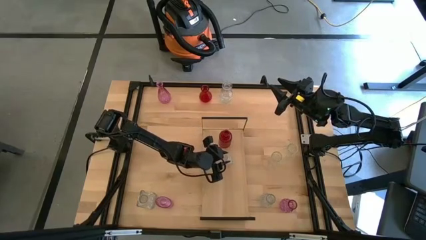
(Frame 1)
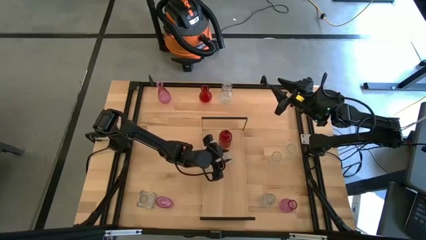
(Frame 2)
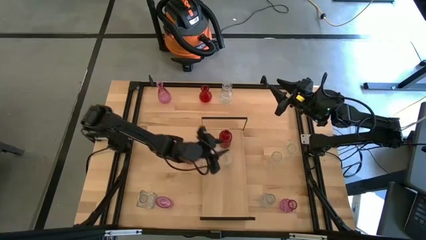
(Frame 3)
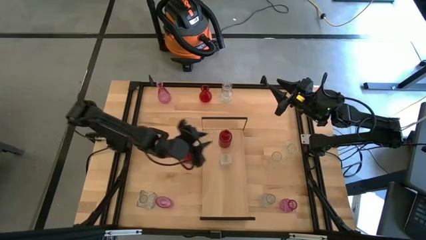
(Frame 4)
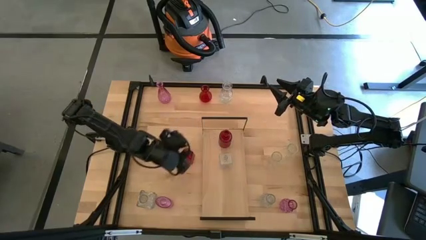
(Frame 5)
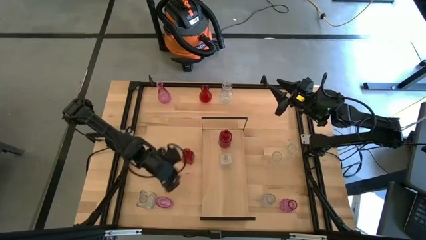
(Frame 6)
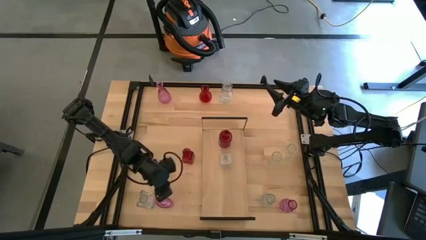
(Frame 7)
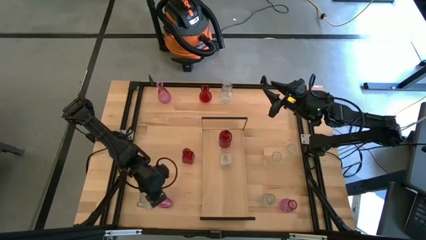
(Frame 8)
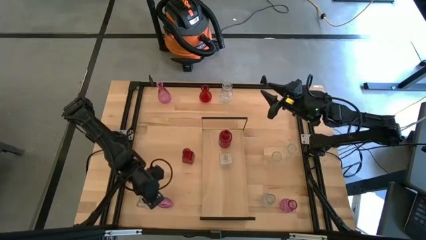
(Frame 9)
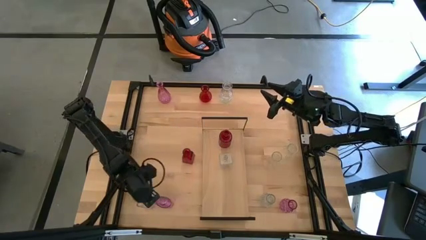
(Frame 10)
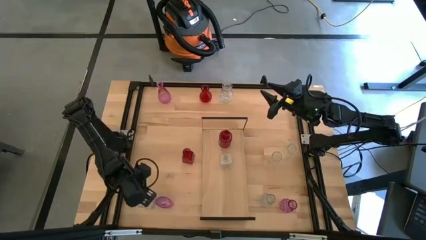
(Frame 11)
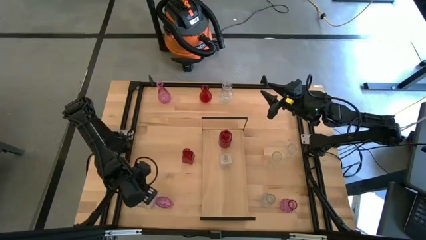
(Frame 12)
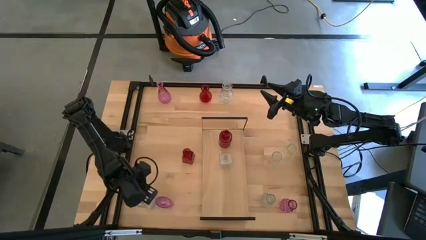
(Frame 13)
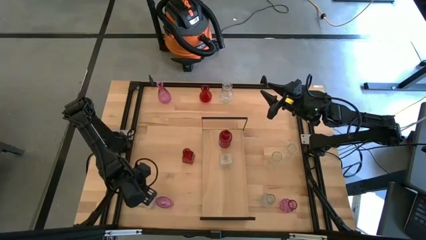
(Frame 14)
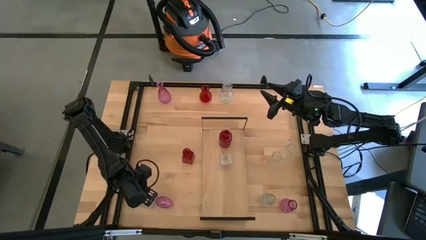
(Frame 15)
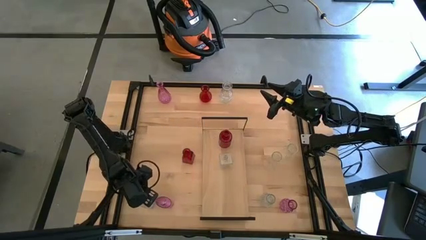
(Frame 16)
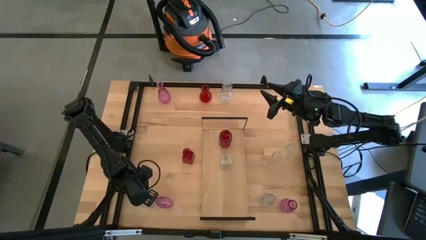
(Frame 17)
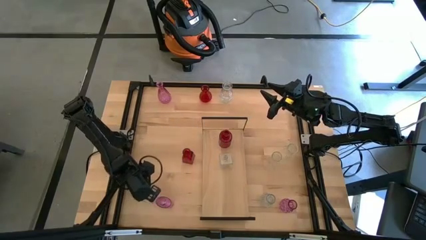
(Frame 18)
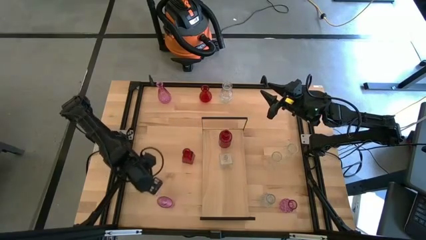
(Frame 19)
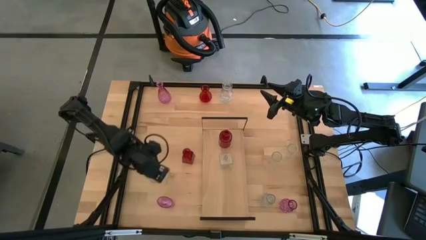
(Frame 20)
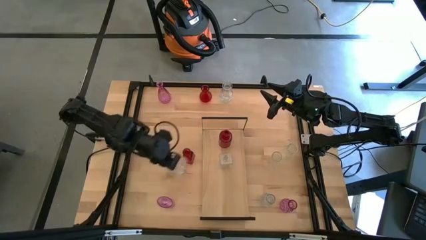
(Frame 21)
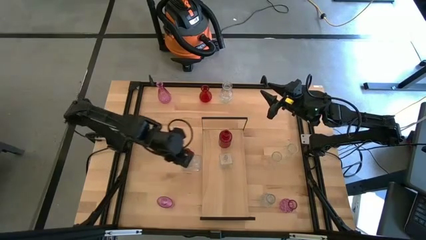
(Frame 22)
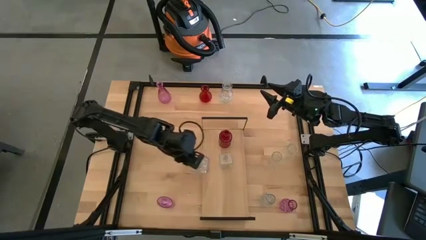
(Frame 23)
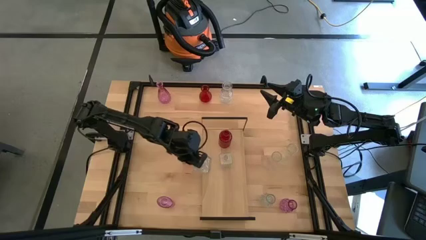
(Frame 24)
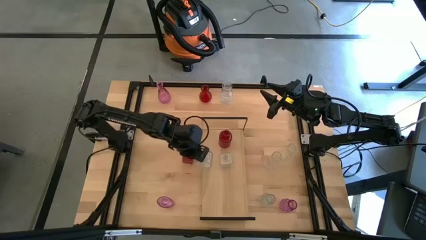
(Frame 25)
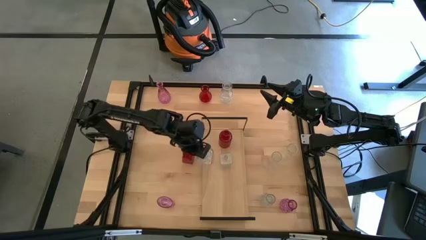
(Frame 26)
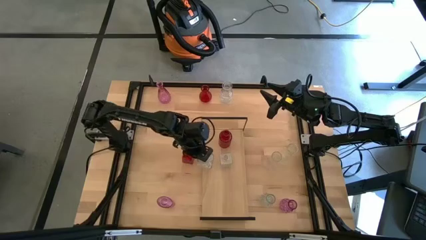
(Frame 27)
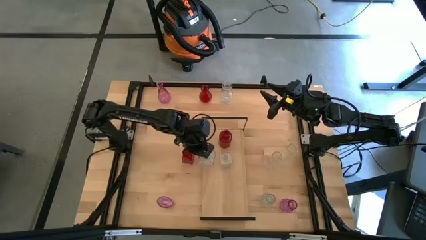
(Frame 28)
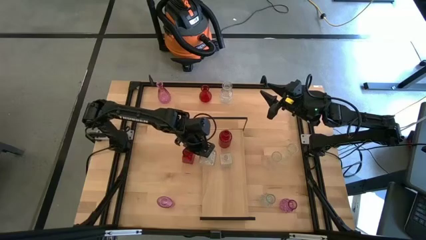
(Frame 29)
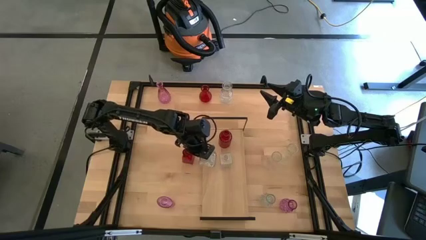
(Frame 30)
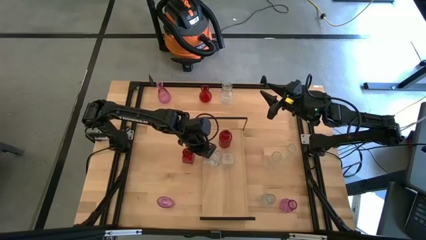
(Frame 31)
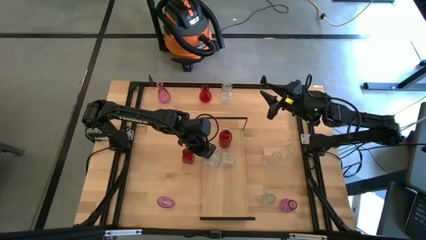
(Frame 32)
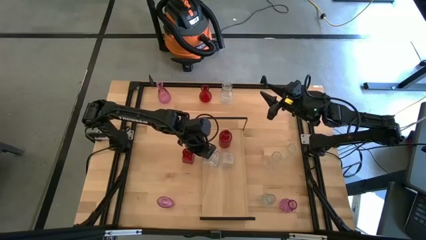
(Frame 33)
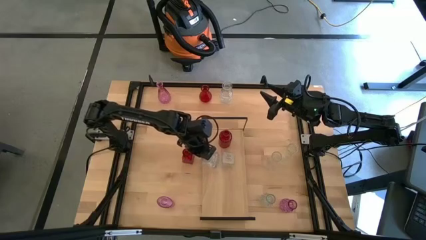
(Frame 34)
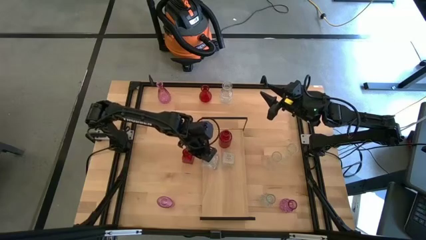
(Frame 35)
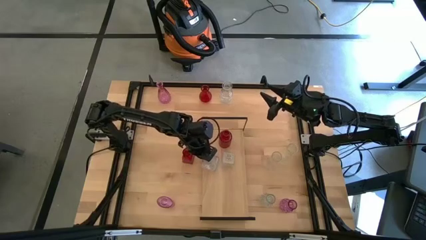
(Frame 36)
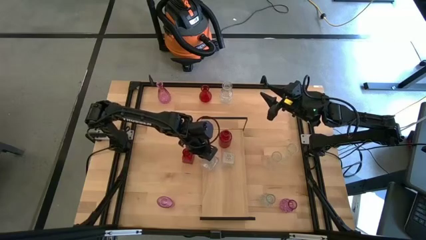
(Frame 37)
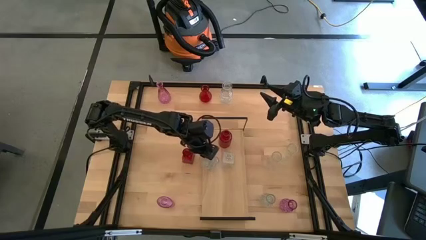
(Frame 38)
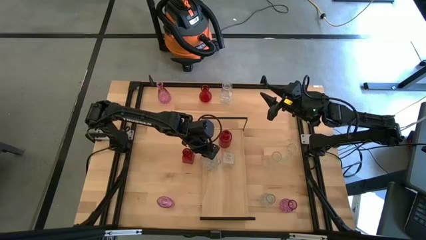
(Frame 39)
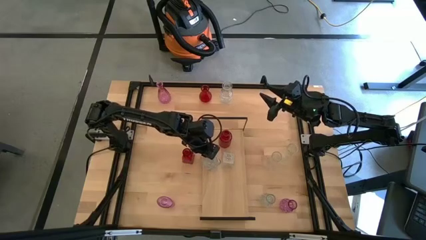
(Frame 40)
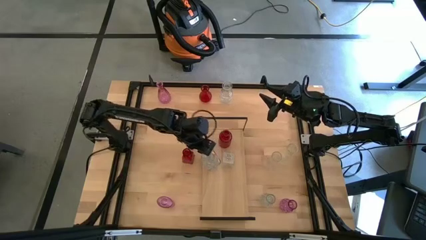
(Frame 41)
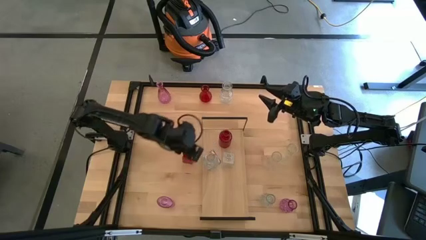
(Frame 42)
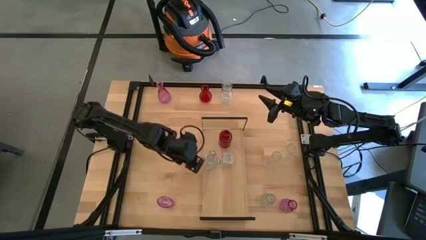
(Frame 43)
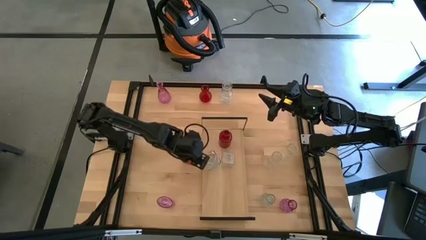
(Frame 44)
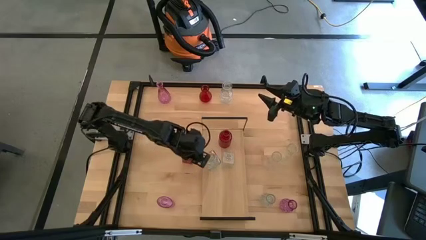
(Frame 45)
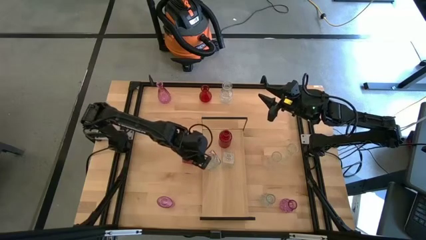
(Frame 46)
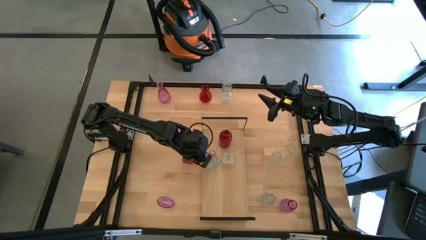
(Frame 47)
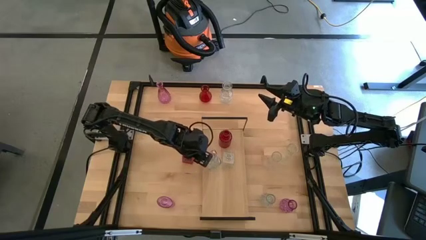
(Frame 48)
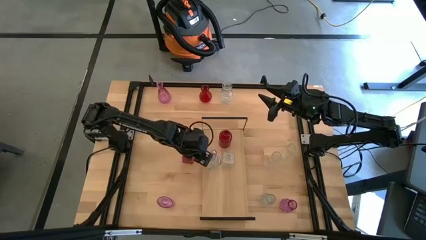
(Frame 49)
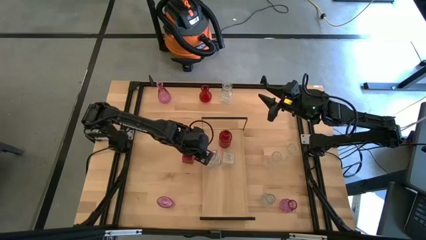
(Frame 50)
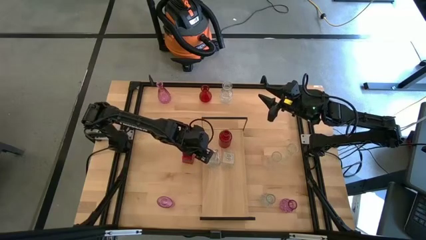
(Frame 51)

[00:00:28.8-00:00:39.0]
Task: sort vases onto shelf
Put the transparent vase on the shelf aligned with the other transparent vase

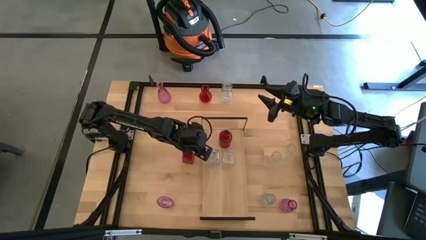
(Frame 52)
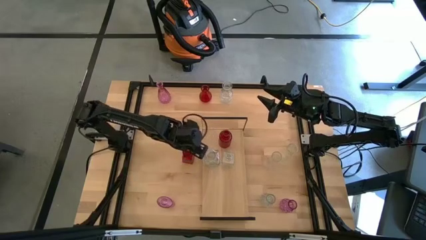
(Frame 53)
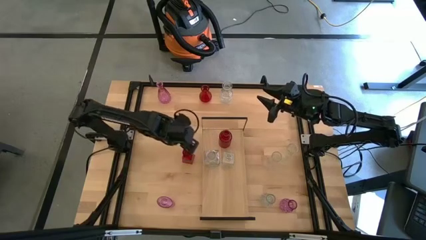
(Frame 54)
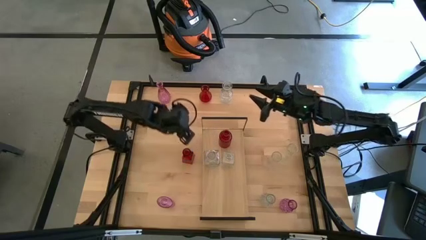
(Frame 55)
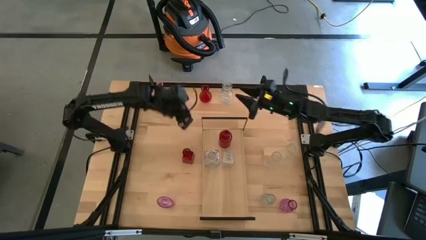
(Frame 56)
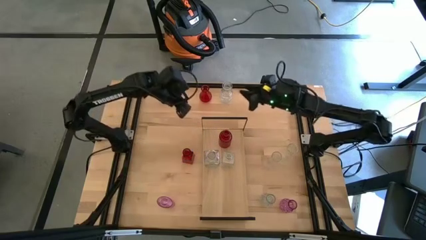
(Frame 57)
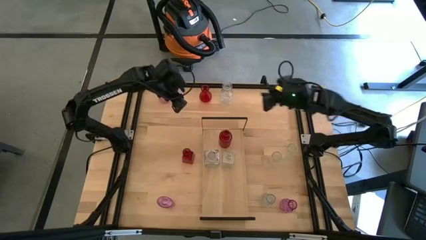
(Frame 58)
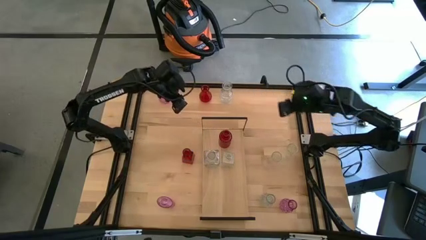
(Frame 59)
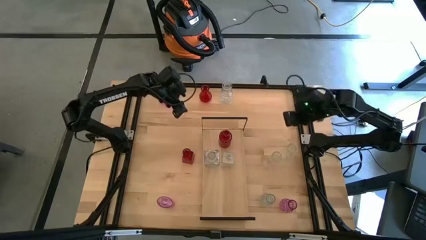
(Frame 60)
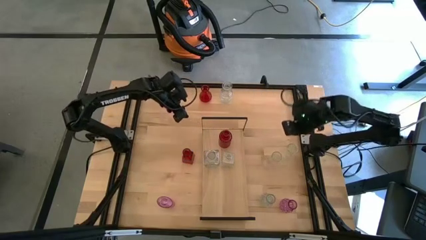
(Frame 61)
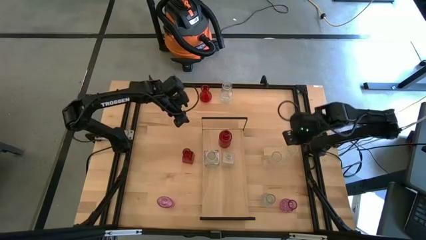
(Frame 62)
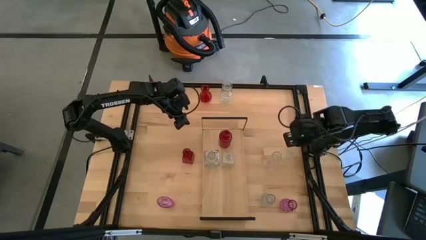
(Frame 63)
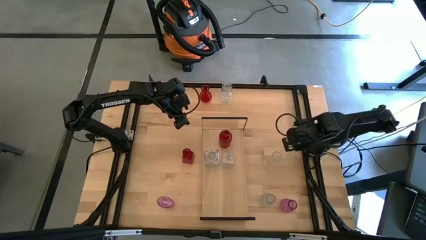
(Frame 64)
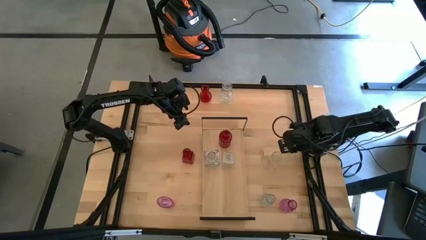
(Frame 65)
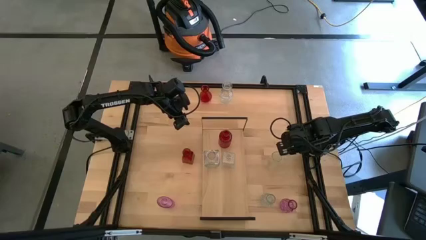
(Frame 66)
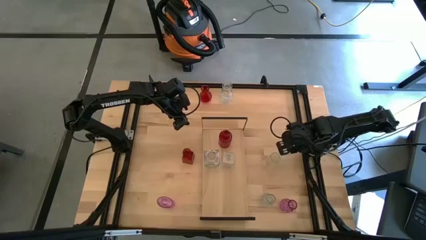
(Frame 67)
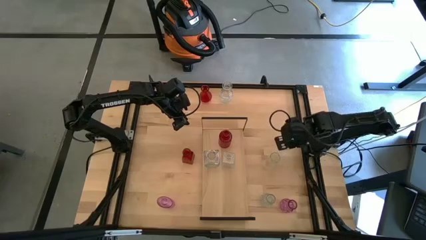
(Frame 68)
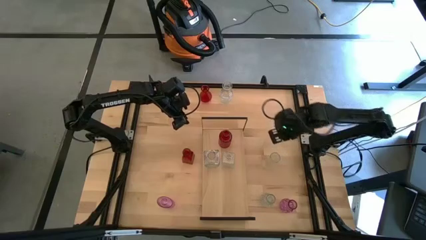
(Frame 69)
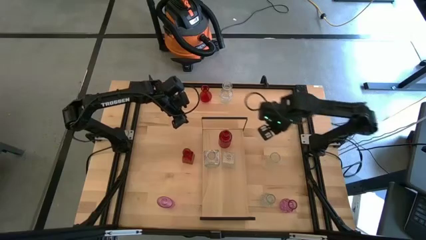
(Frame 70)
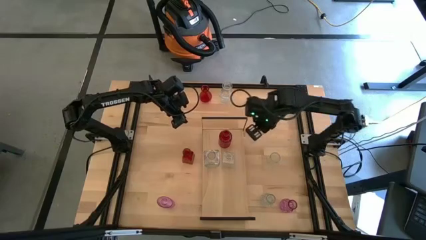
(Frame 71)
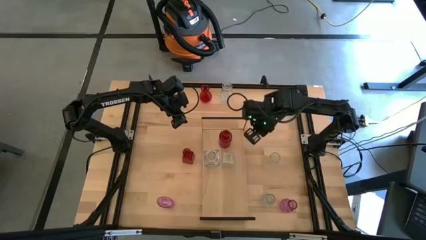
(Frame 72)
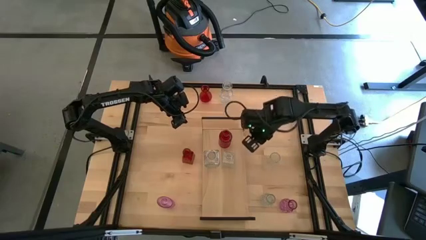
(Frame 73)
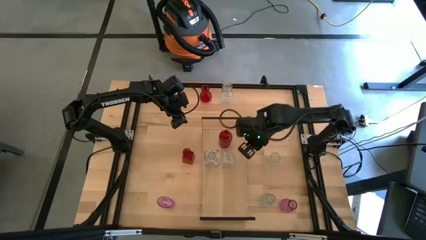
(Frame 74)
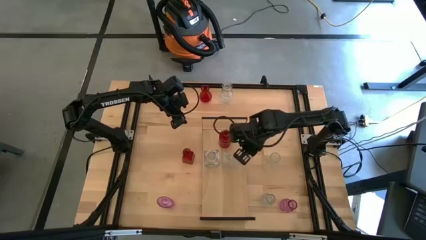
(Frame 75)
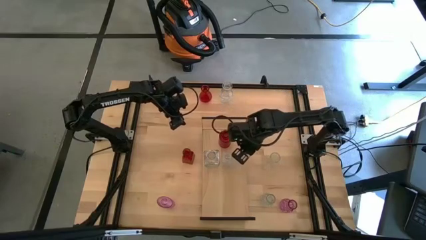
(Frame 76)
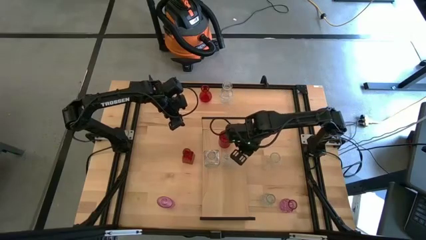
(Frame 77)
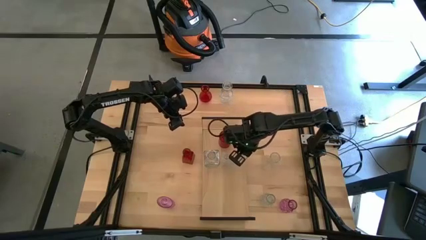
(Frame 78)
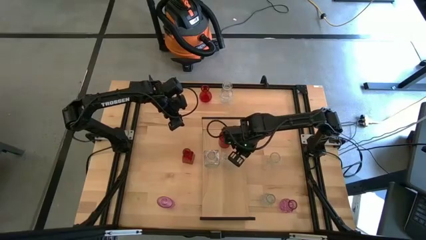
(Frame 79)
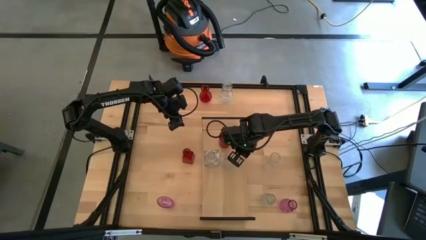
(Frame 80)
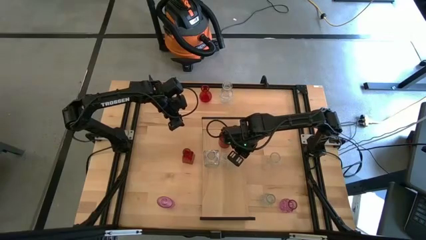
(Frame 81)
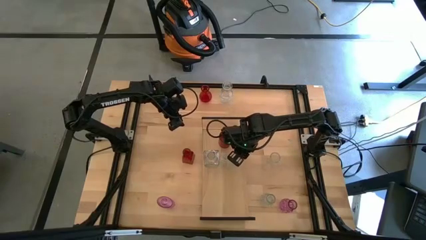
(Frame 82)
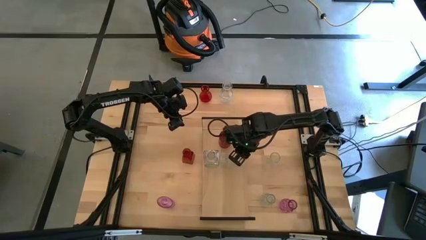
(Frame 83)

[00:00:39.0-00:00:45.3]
Put the transparent vase on the shelf aligned with the other transparent vases
